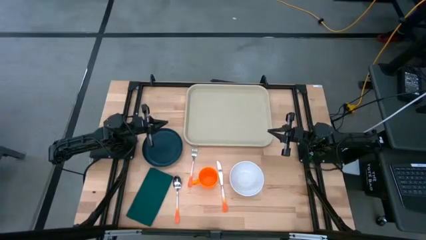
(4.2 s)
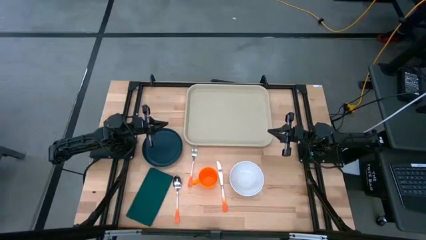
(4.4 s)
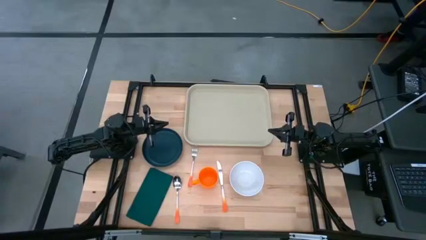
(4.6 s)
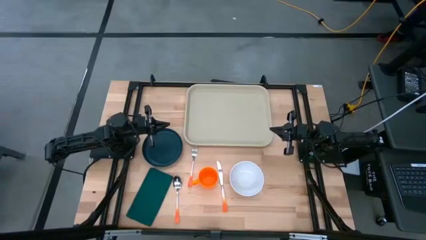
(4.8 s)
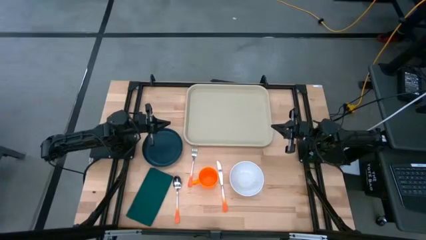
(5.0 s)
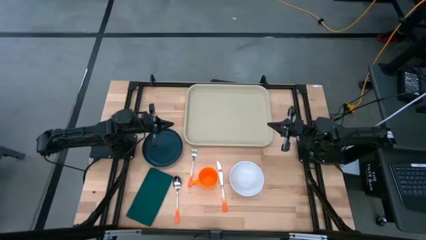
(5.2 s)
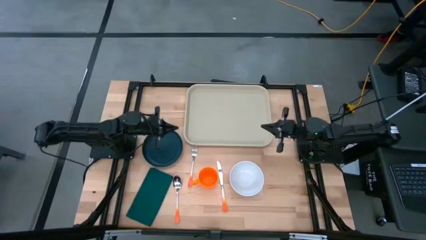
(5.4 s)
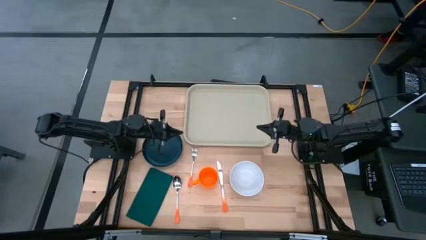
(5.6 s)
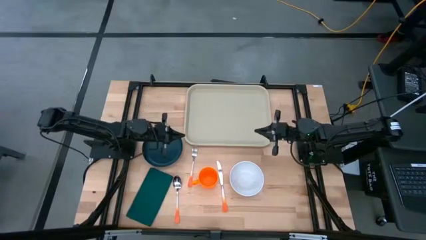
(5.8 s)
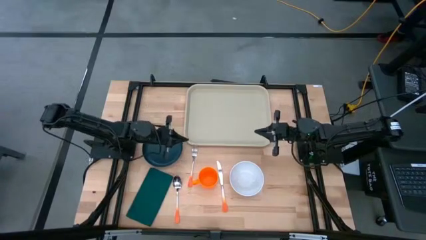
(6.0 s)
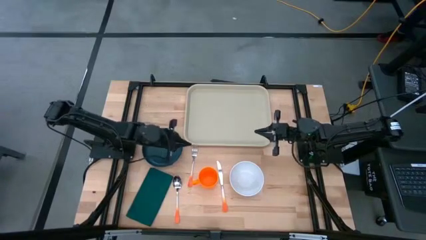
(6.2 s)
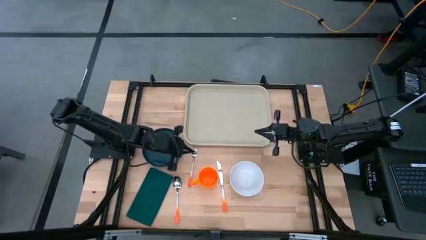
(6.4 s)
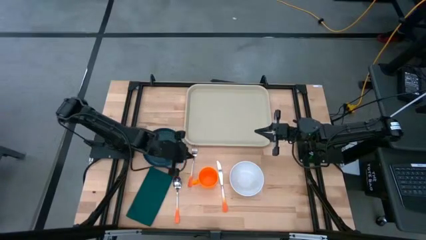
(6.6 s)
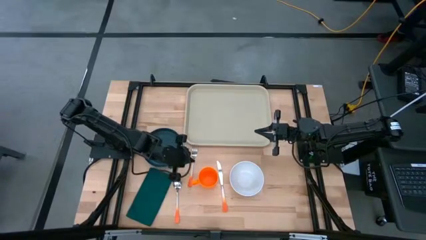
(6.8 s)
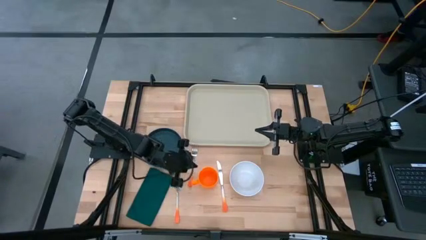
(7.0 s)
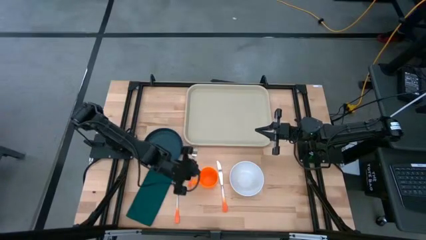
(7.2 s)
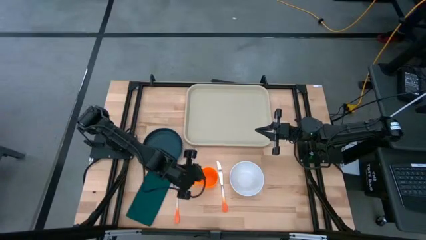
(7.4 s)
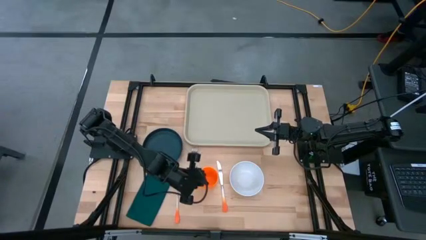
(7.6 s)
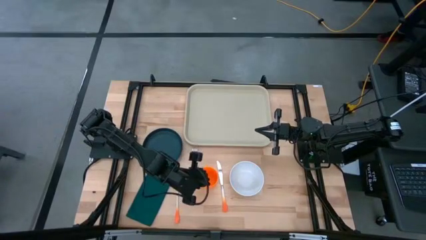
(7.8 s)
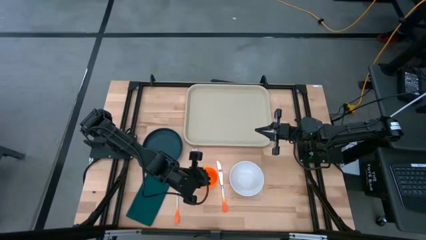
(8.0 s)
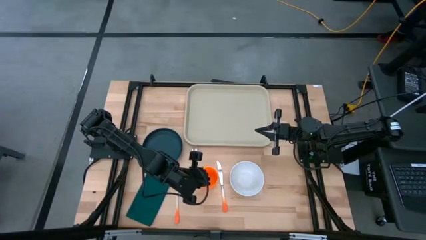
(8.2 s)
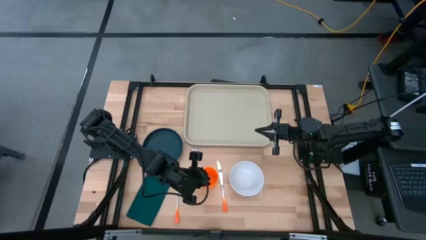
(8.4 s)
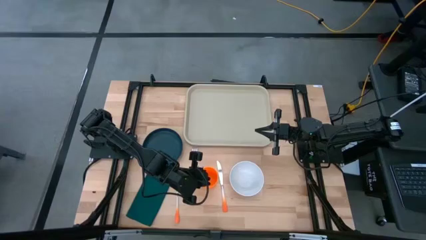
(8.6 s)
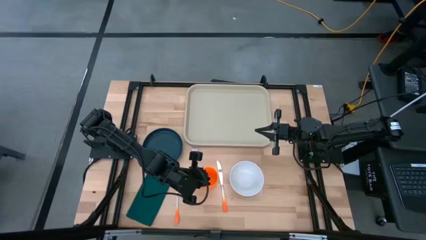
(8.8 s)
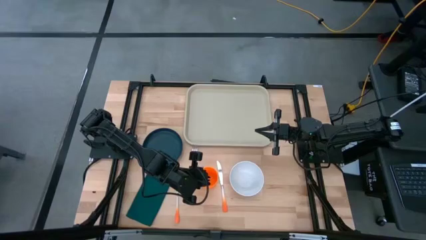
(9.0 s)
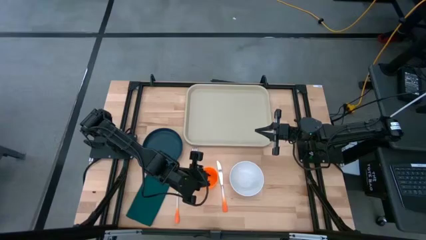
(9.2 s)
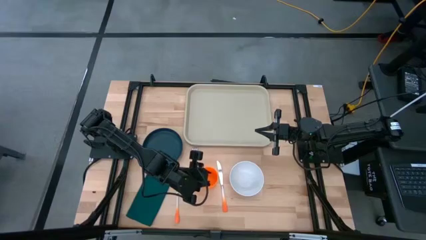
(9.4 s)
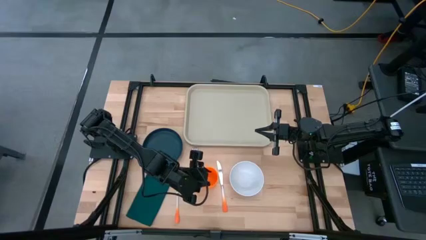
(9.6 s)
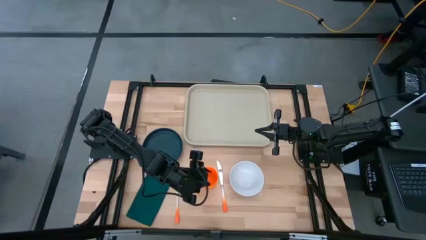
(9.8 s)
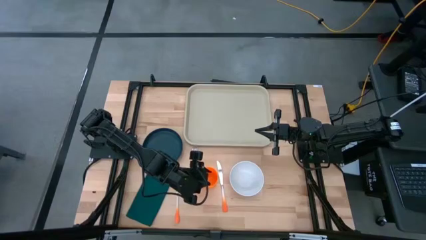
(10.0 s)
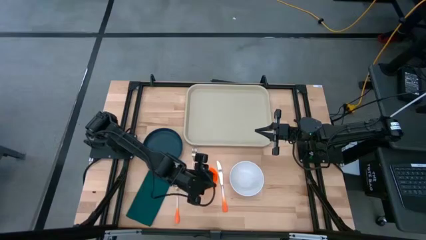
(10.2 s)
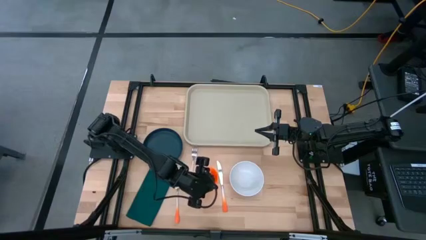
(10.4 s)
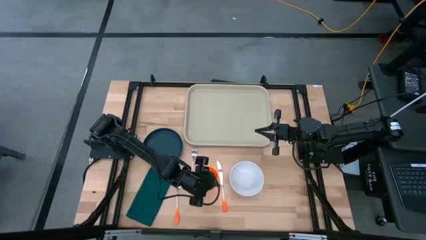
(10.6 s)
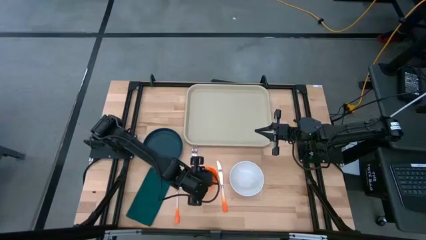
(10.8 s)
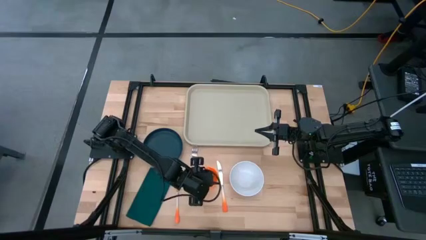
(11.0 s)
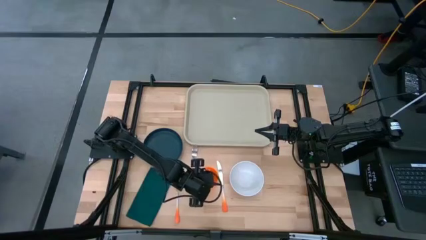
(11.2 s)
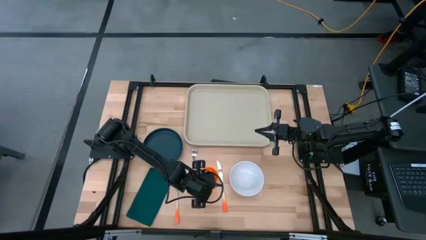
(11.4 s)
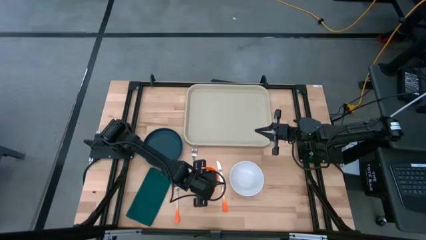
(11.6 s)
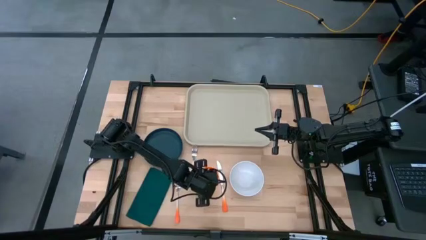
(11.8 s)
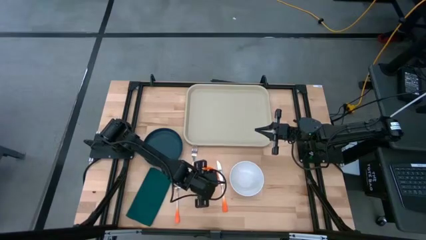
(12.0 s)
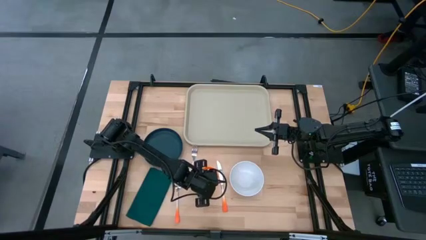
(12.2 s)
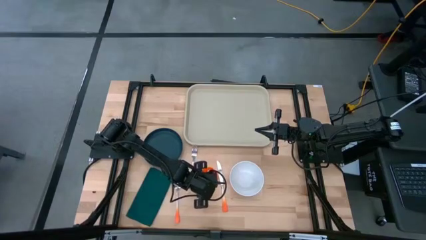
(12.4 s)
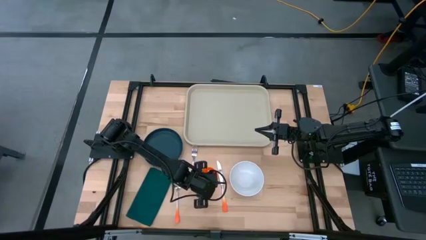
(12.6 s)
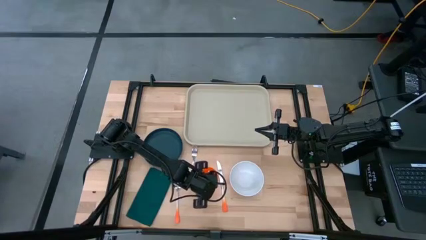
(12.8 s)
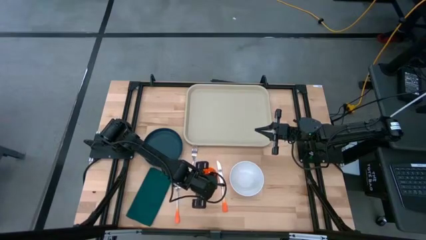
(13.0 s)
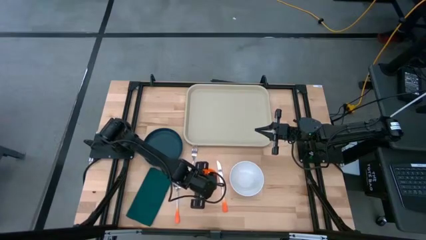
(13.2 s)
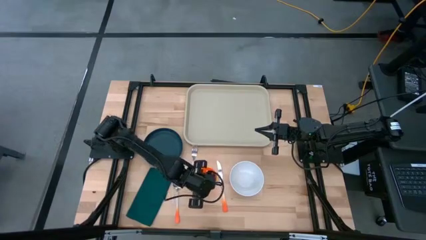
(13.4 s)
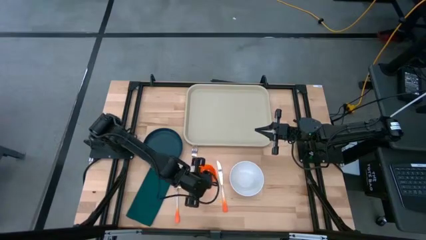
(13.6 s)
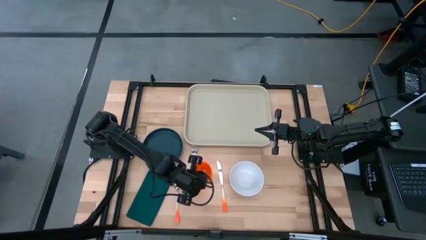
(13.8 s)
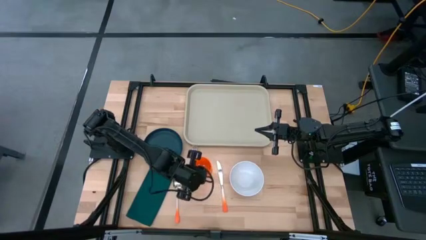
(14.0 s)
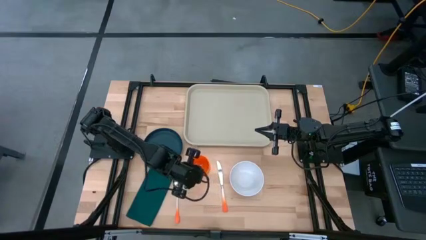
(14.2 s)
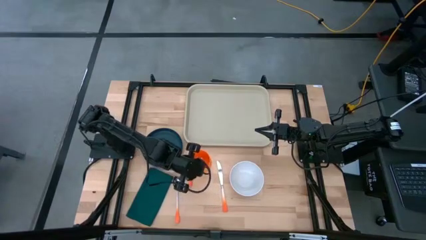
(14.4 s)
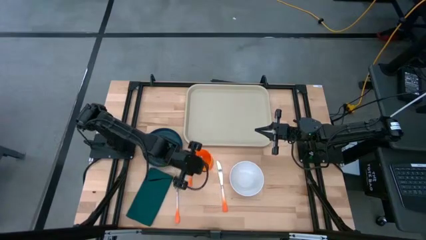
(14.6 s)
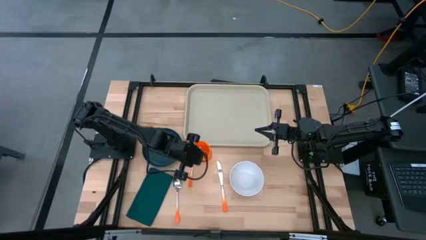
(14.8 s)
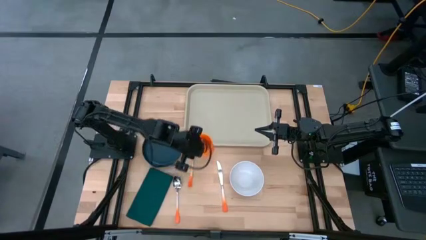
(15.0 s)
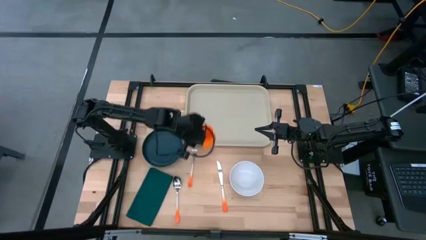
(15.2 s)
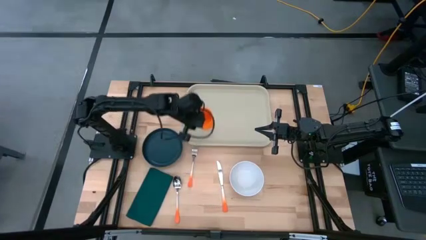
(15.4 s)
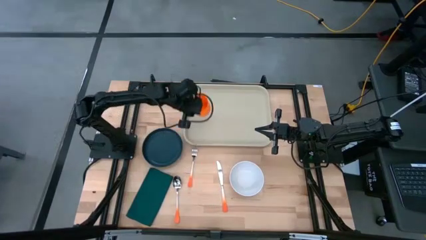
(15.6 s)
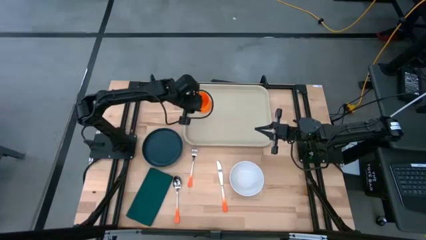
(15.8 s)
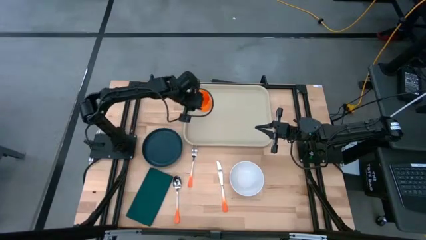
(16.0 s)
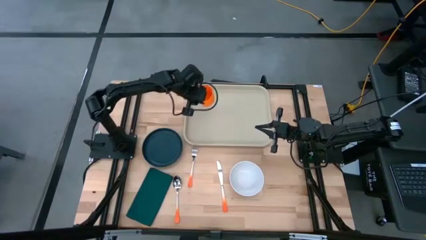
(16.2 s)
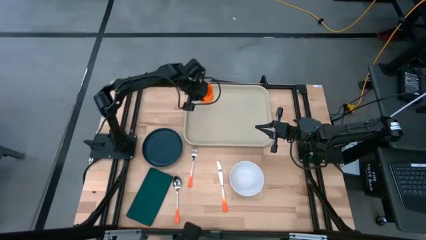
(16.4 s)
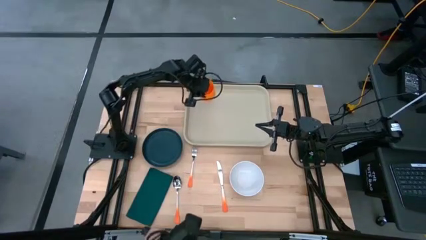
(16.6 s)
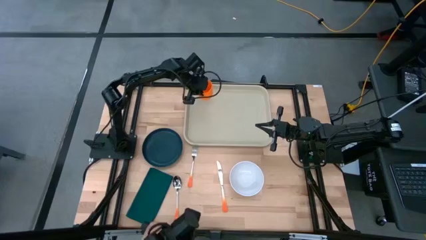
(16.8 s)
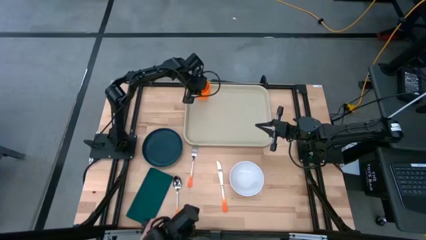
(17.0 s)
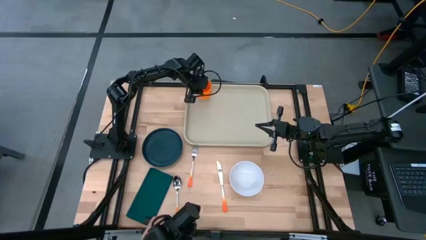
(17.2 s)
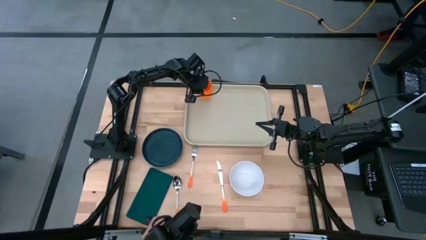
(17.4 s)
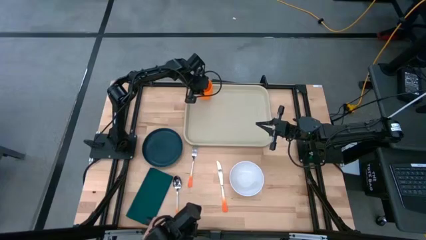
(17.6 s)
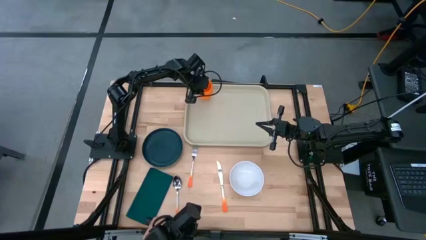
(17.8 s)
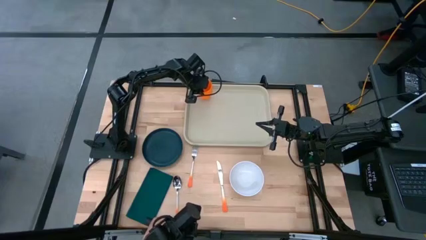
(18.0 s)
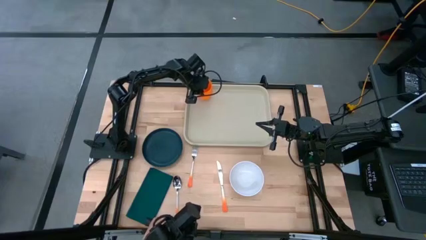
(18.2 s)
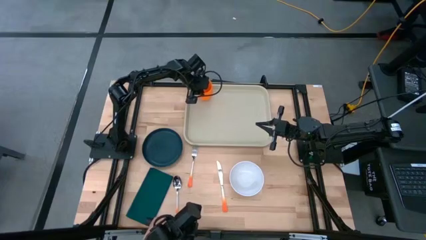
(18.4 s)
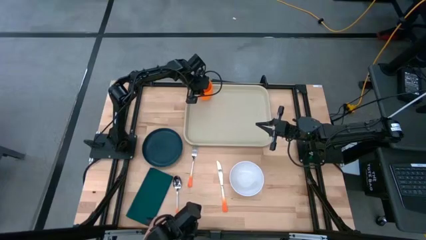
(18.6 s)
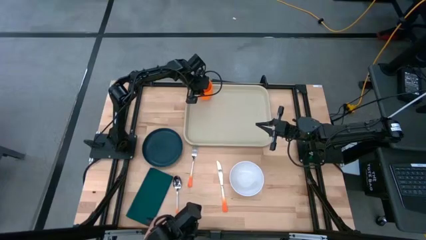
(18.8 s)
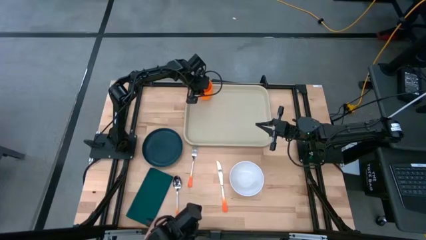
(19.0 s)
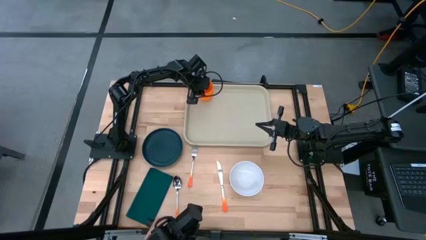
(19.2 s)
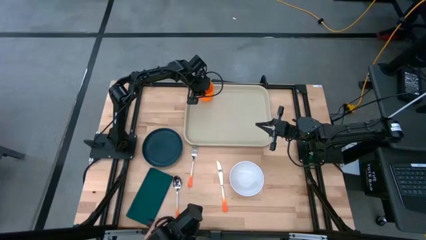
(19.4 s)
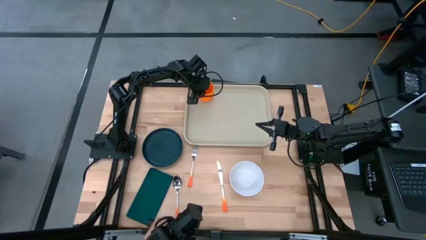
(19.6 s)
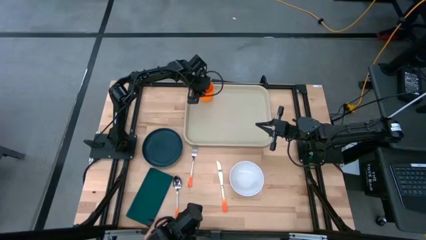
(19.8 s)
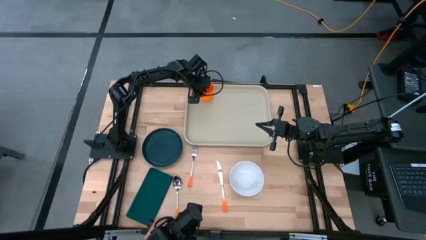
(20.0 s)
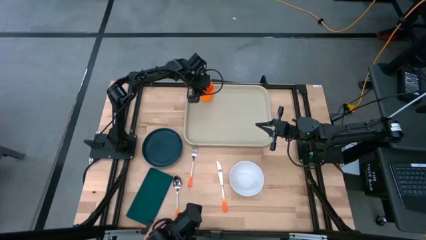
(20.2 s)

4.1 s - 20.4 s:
Task: Set up tray
Put the orange mug at the top left of the gray serving tray
